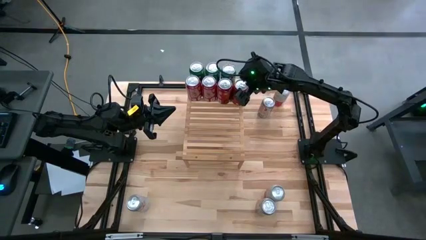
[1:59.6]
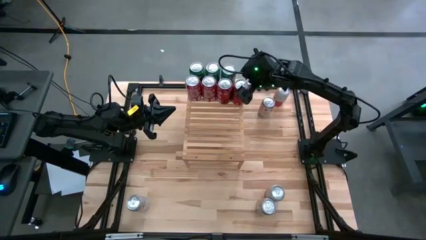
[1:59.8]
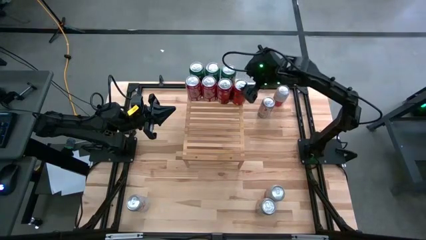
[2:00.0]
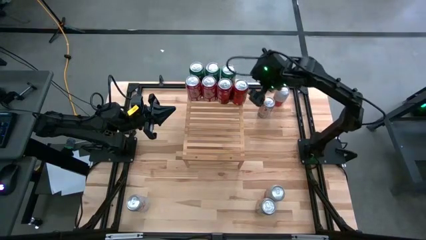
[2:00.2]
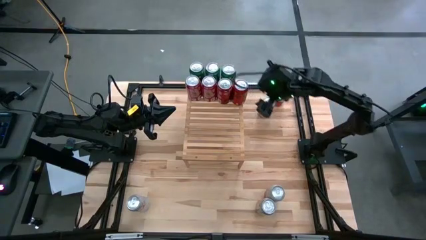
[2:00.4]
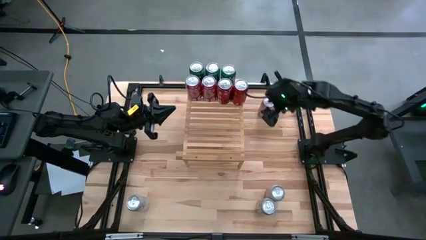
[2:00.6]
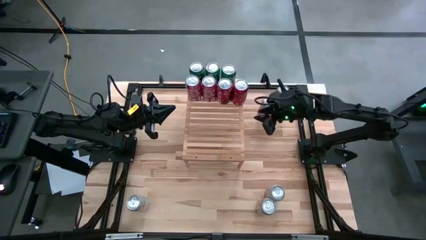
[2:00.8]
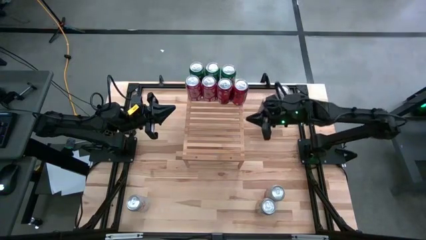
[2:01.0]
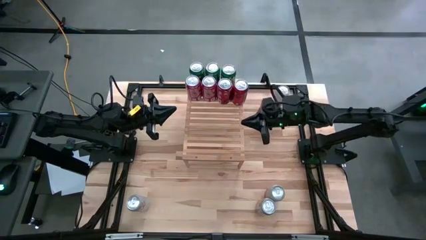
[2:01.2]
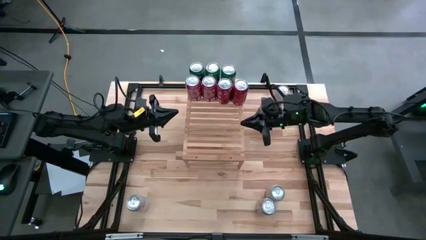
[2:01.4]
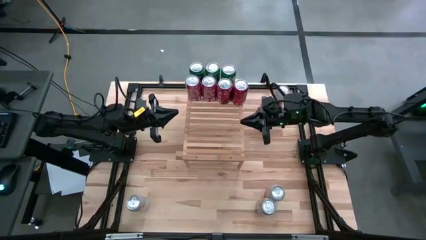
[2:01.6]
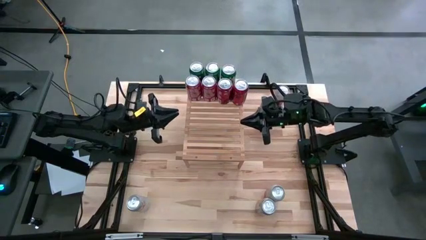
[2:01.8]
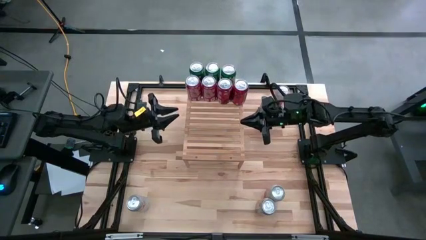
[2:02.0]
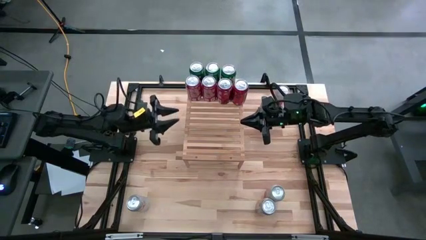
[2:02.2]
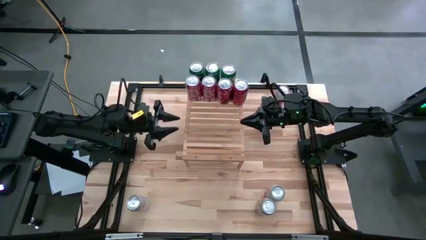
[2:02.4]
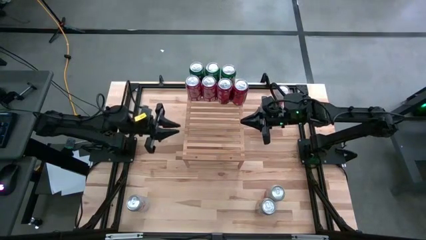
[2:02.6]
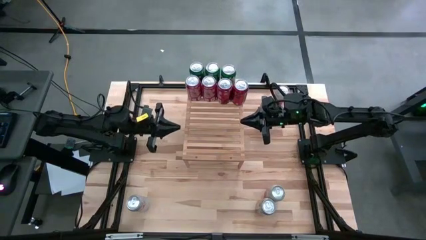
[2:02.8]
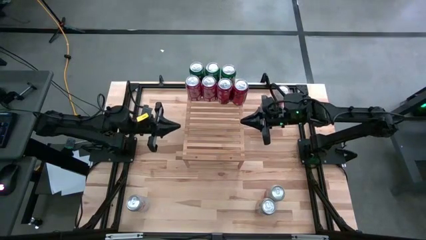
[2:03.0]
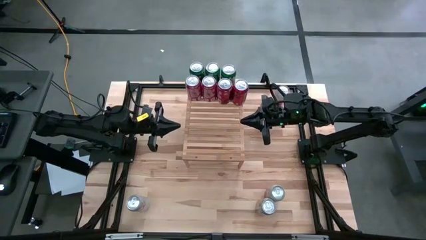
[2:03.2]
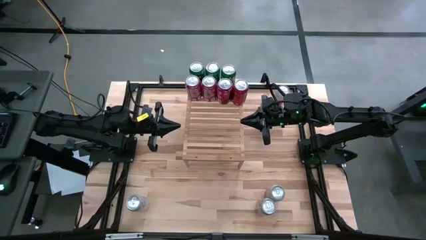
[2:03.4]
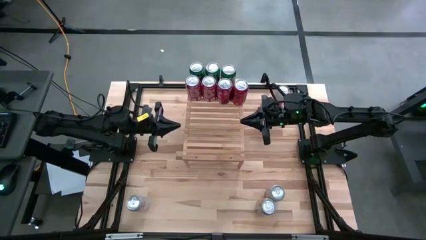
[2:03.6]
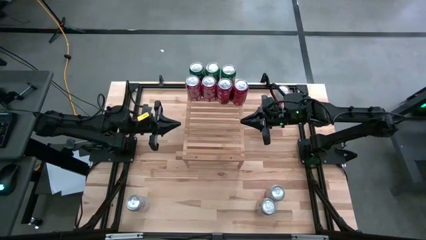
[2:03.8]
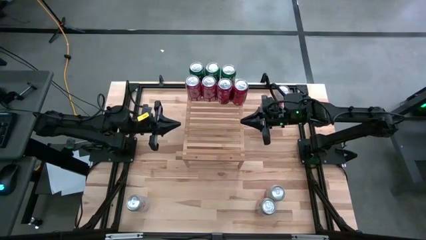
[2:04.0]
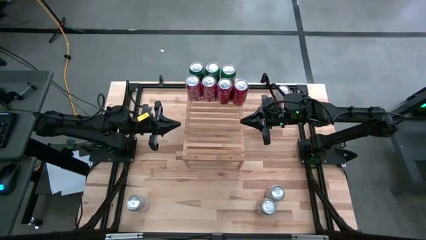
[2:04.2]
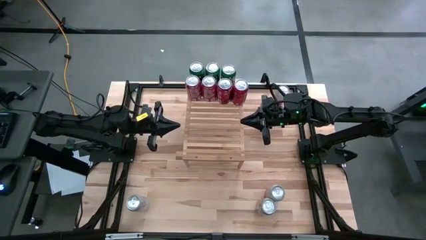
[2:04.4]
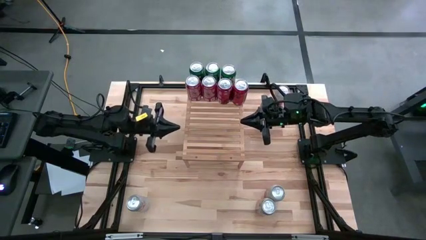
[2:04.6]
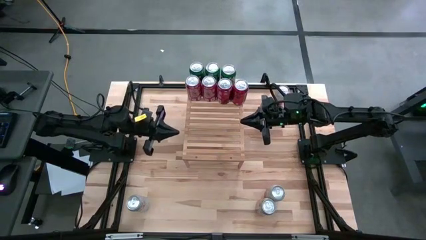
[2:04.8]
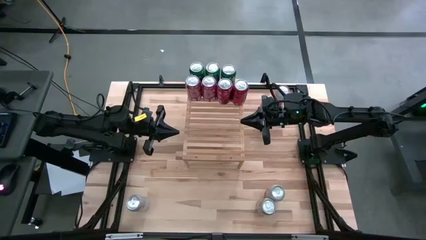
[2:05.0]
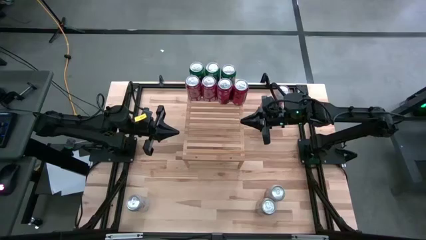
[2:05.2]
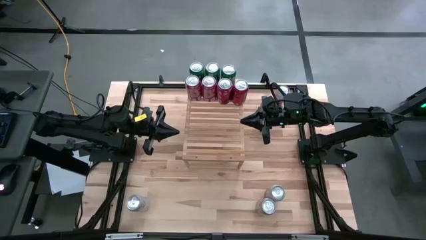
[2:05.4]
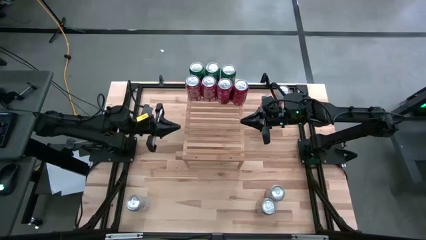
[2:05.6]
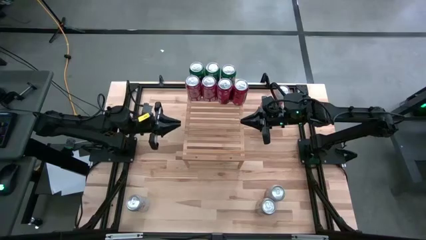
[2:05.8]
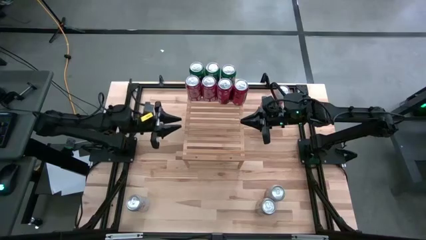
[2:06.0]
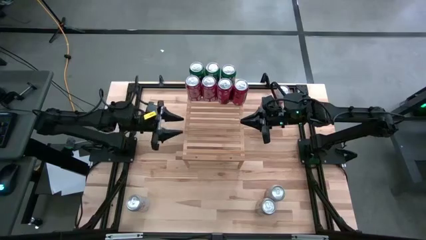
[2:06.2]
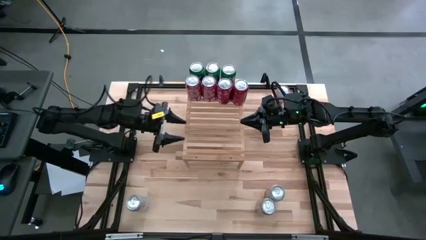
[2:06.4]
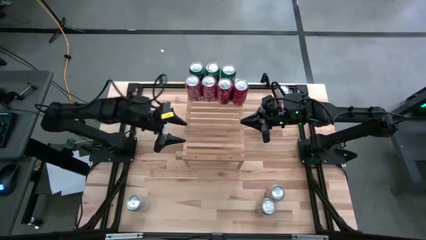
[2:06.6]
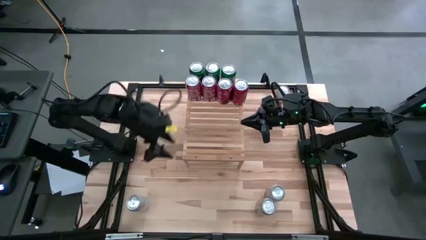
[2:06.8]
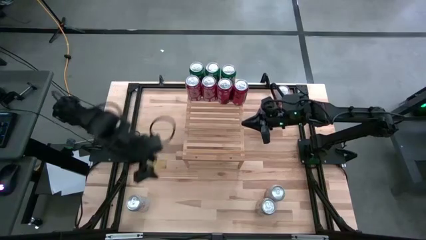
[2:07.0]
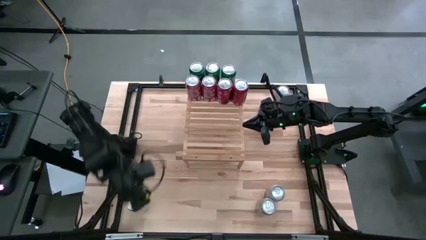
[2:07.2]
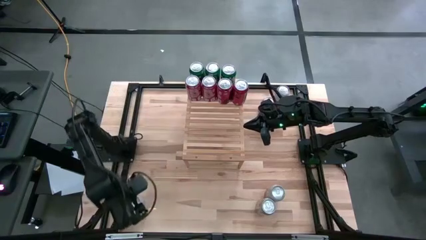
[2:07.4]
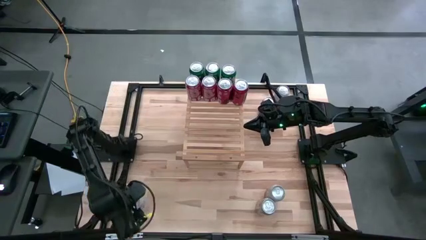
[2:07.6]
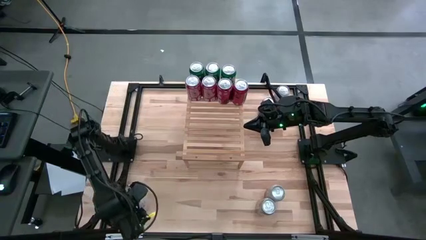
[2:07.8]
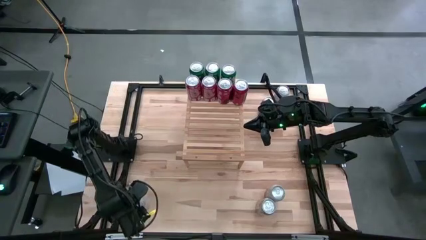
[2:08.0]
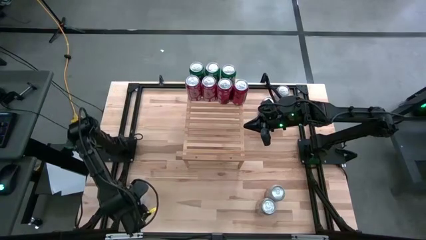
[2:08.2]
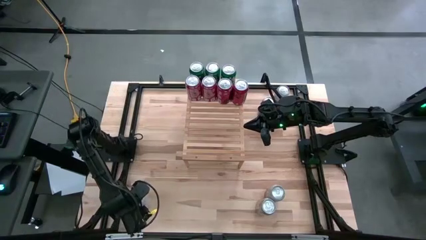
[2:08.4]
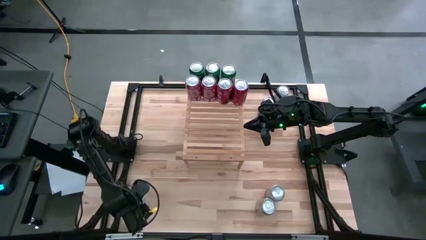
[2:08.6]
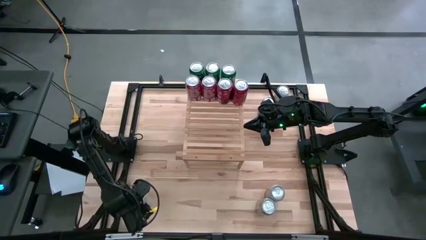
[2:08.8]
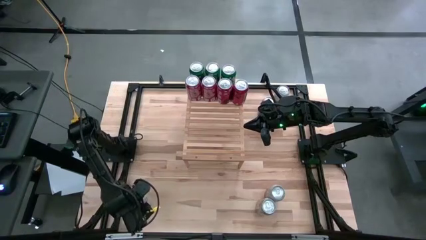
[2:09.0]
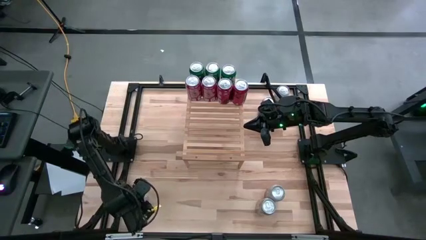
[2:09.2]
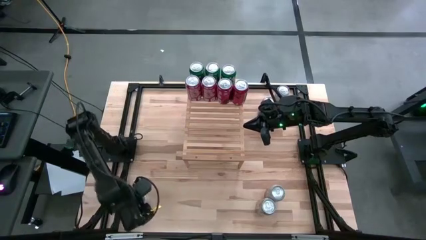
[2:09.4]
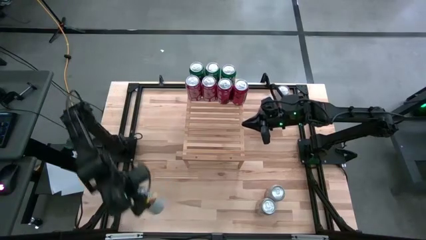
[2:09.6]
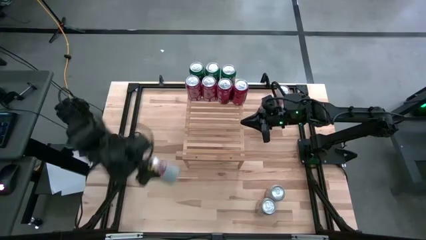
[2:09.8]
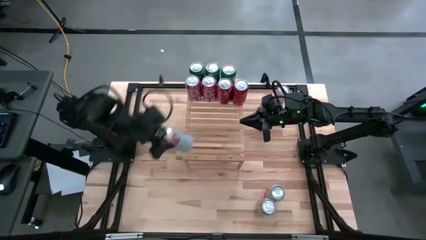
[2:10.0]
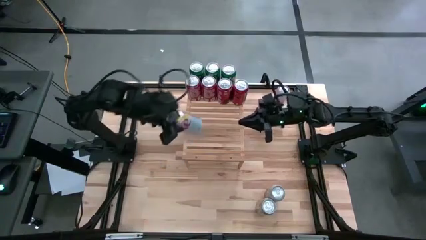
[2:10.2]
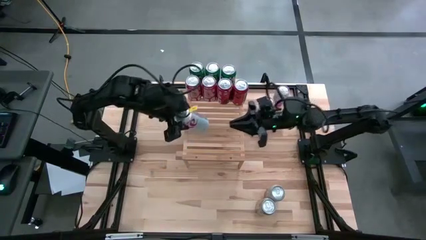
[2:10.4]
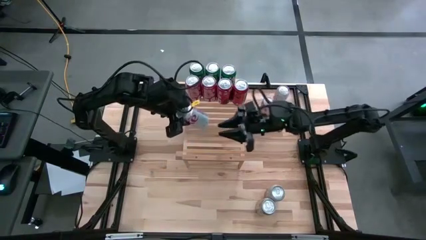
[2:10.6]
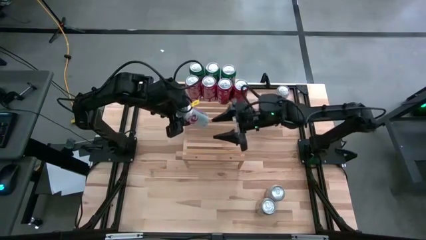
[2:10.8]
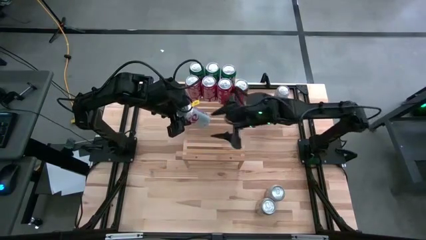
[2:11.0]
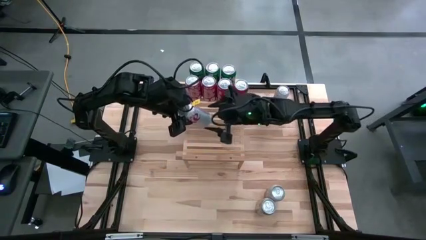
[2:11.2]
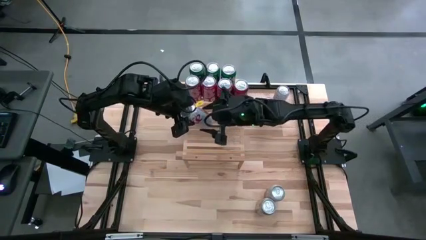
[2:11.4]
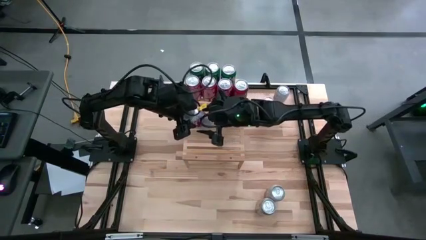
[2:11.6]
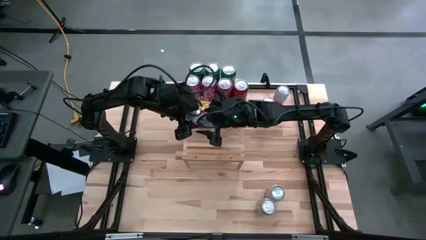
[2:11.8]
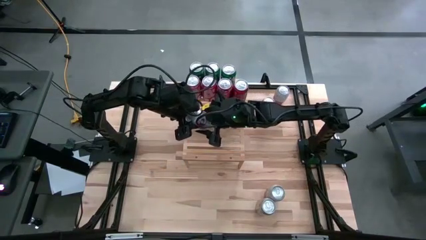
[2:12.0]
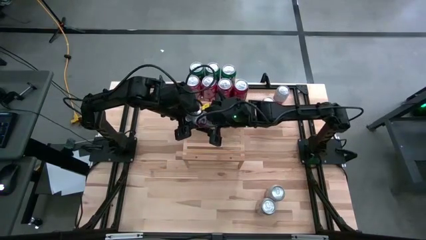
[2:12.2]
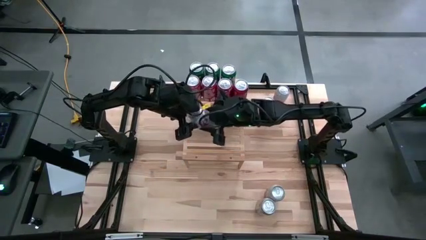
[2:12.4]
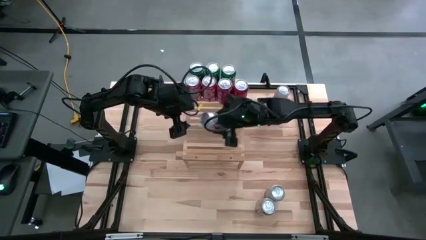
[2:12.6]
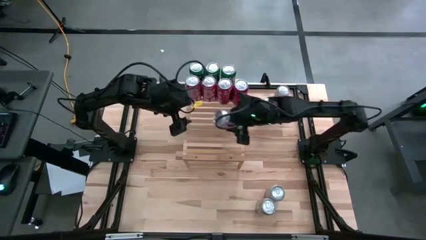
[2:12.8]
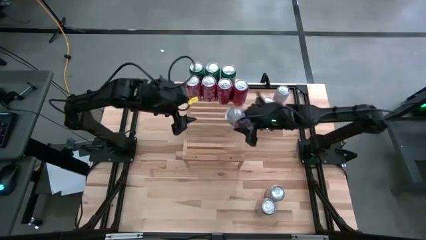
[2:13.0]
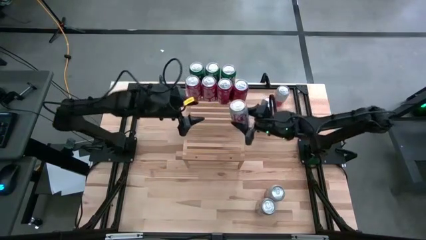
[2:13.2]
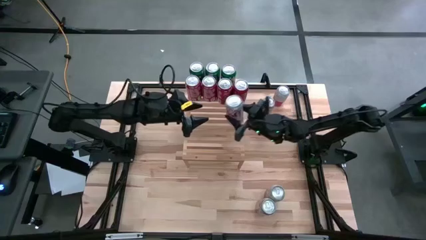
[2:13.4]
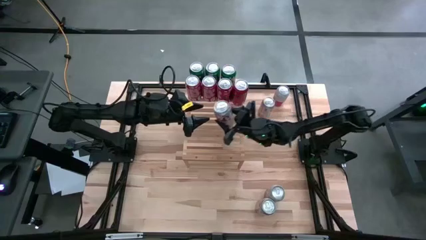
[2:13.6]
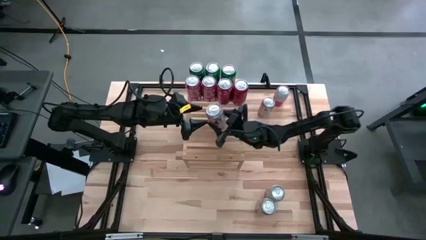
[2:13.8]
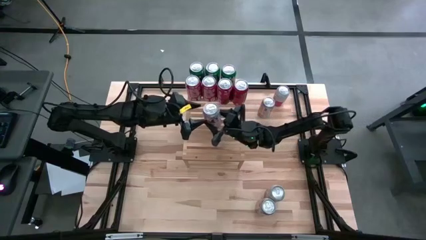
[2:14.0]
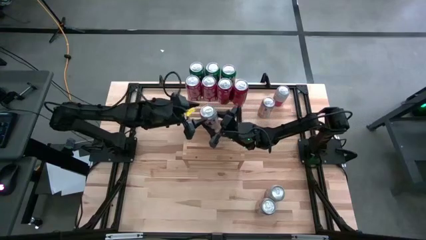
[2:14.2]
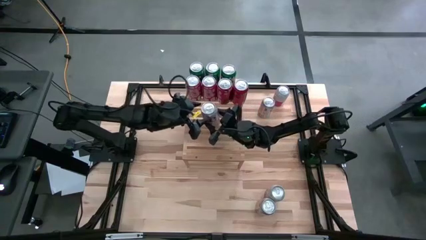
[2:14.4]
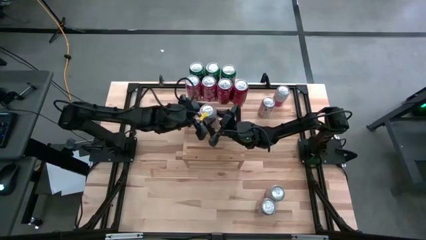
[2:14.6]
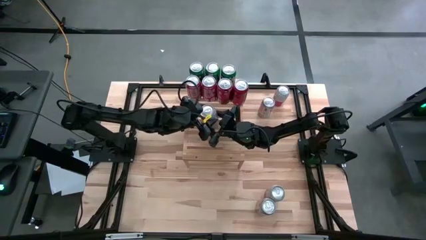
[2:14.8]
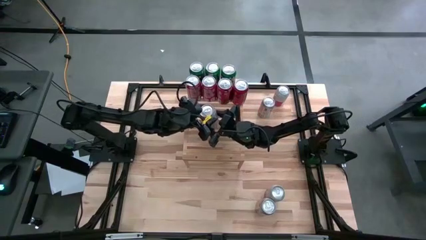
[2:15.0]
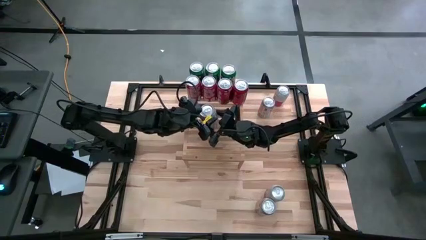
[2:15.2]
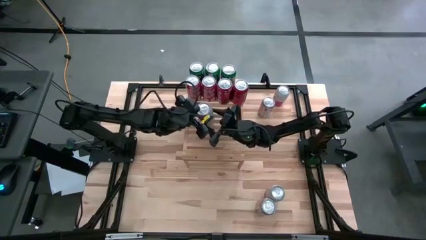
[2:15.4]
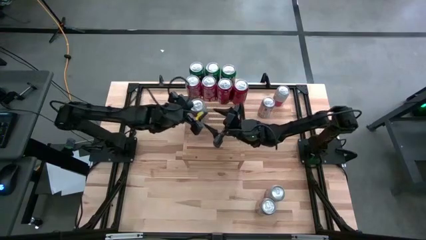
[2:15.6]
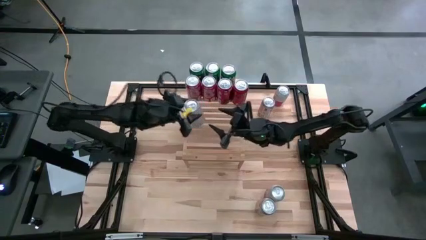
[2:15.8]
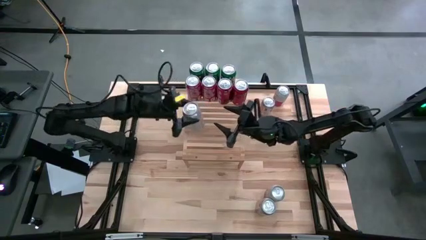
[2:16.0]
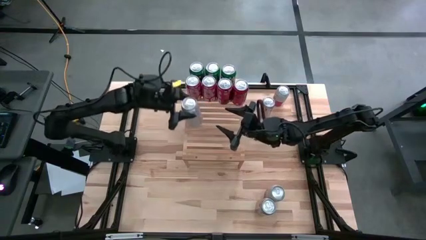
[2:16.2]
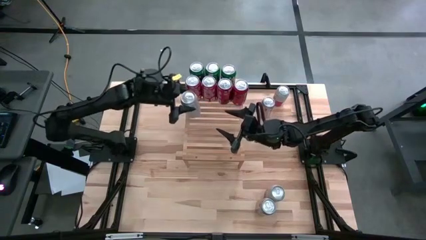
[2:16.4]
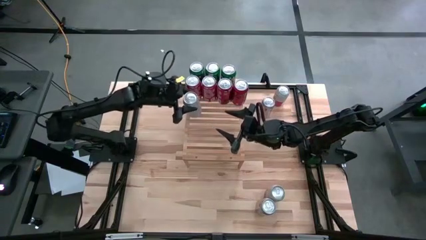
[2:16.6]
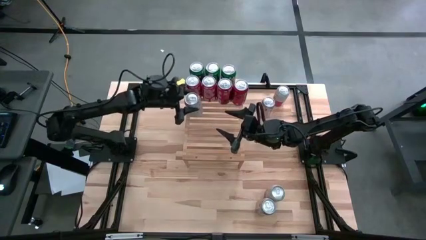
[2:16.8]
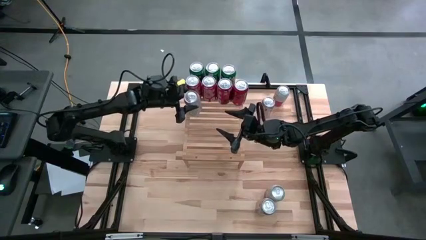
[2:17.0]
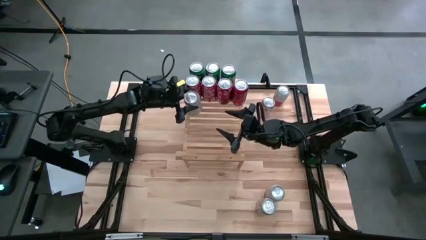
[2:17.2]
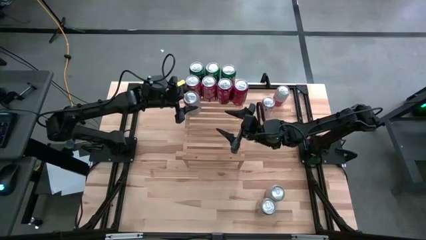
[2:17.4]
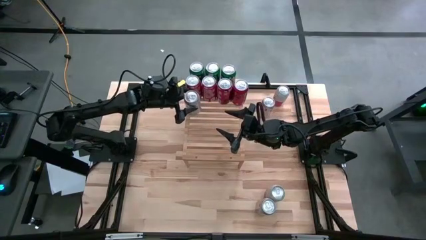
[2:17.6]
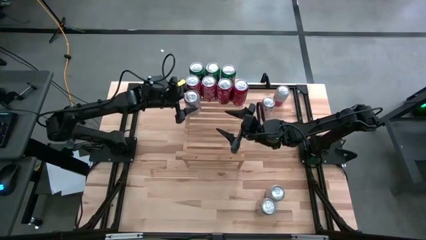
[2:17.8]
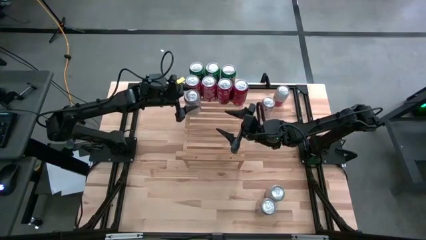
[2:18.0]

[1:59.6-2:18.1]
Task: Place canned beverage on shelf
Put the bottom left silver soda can on the shelf
